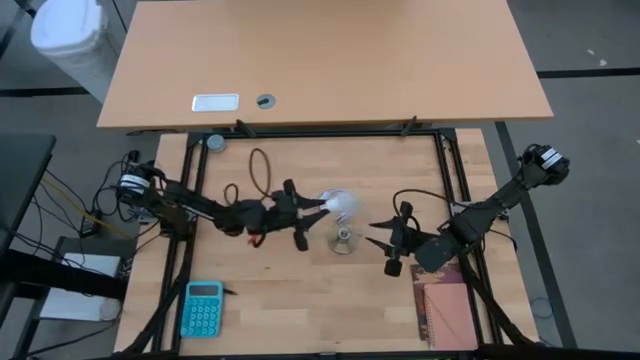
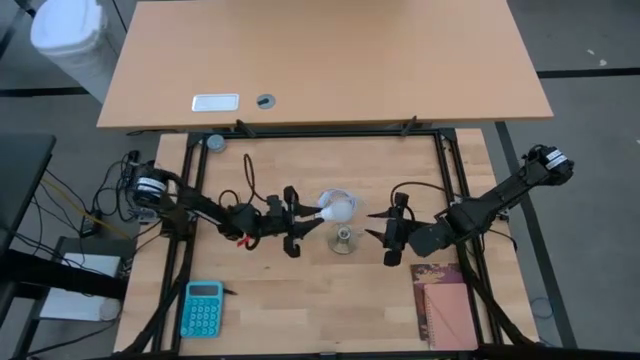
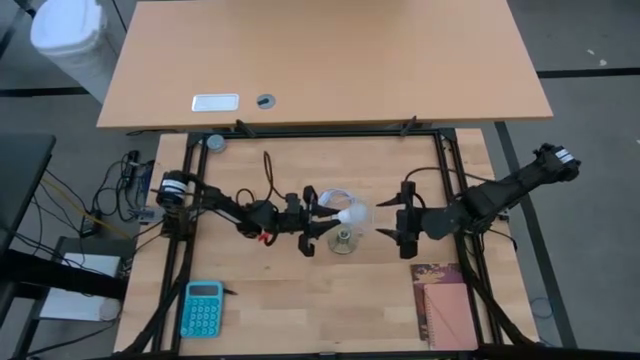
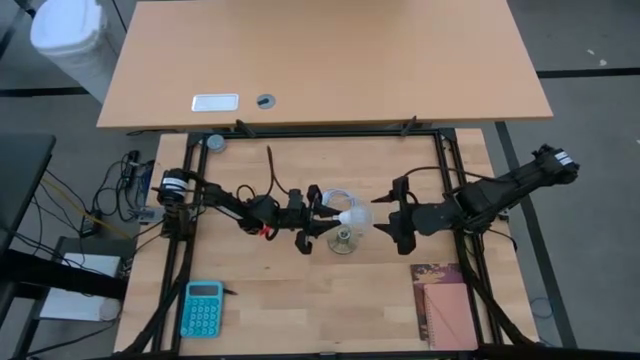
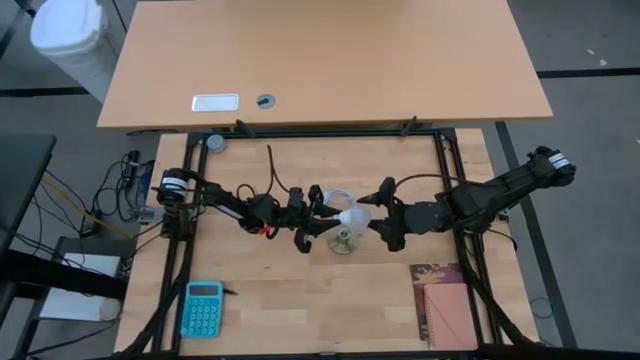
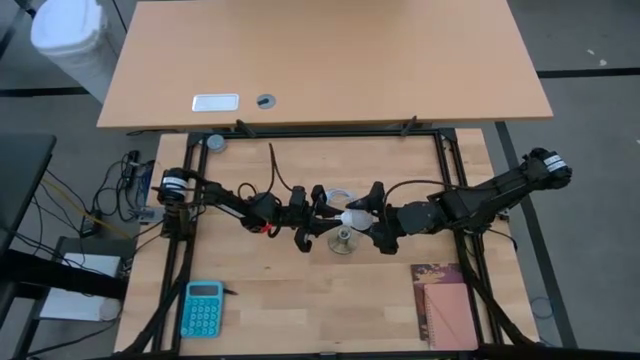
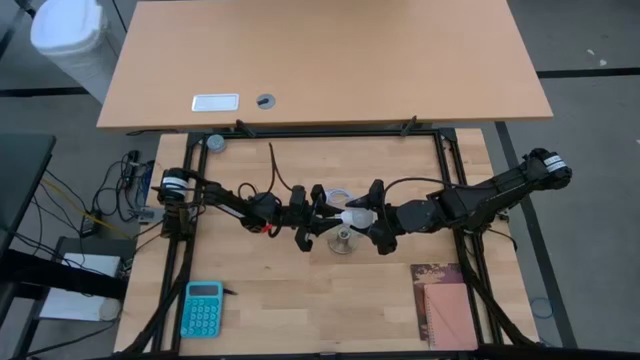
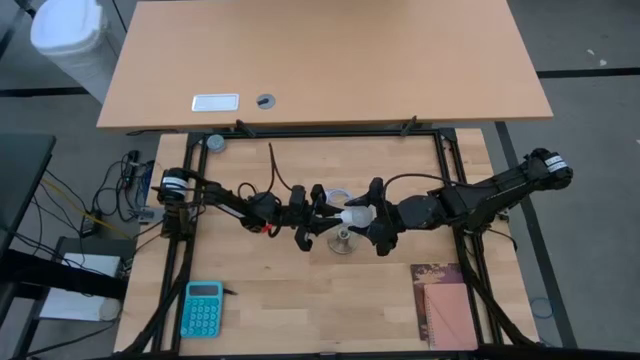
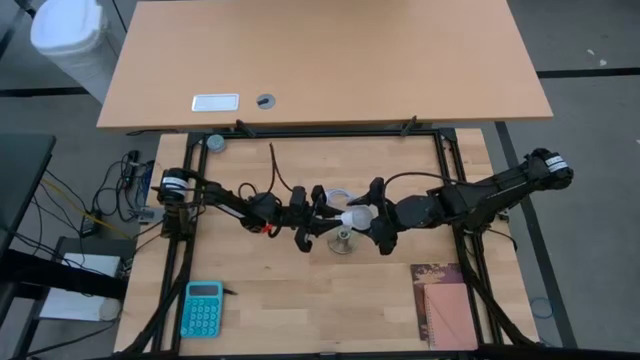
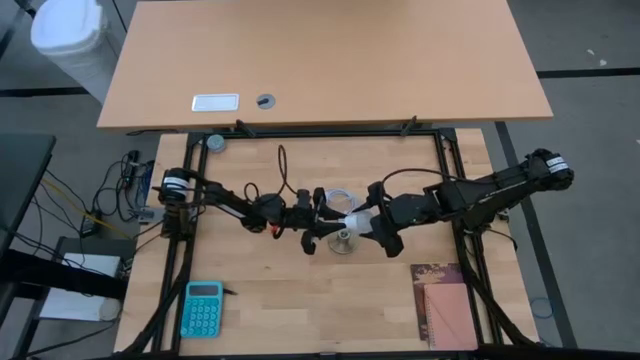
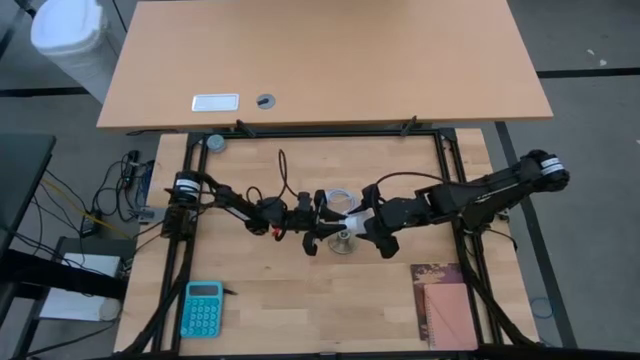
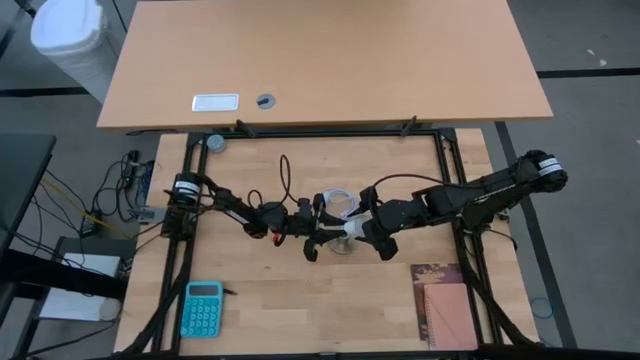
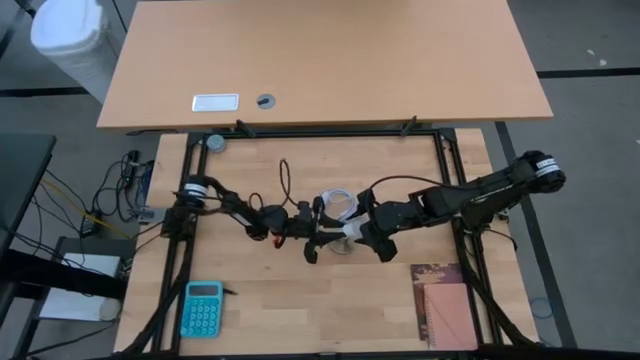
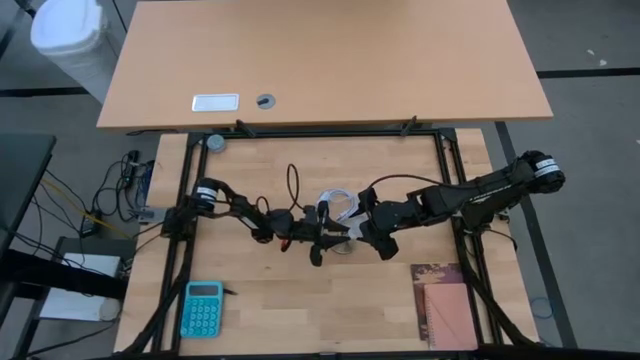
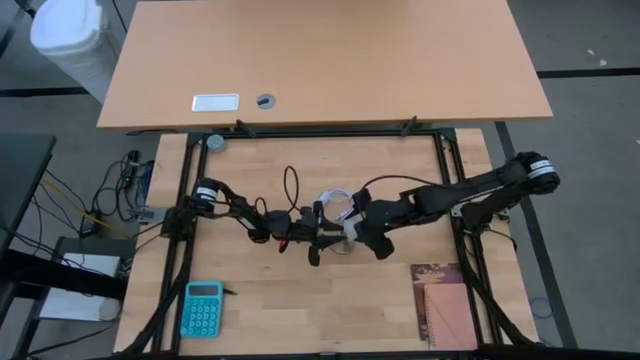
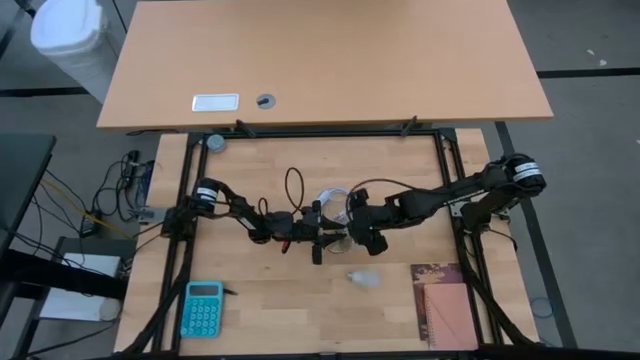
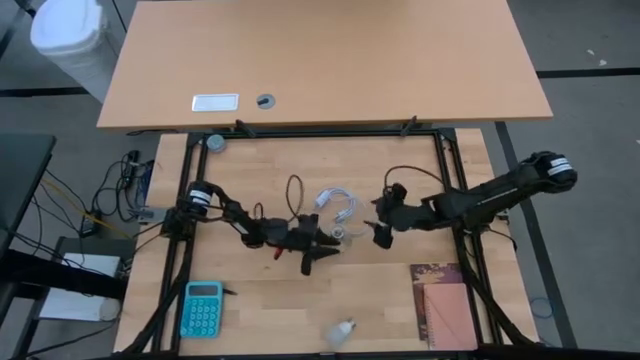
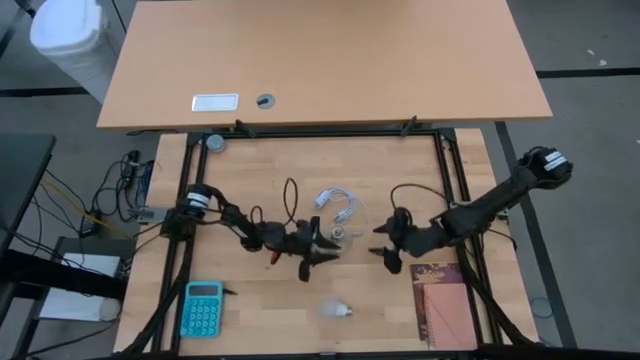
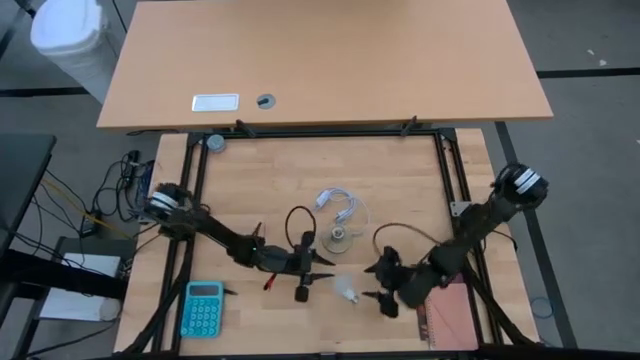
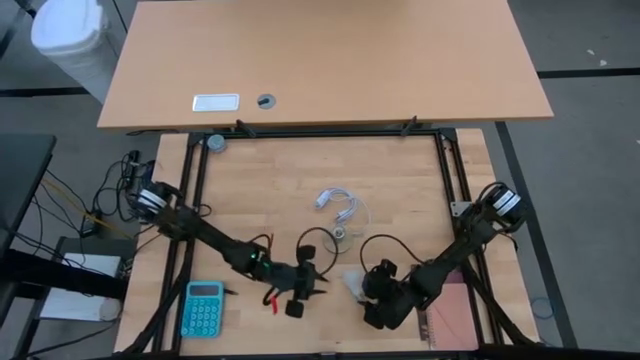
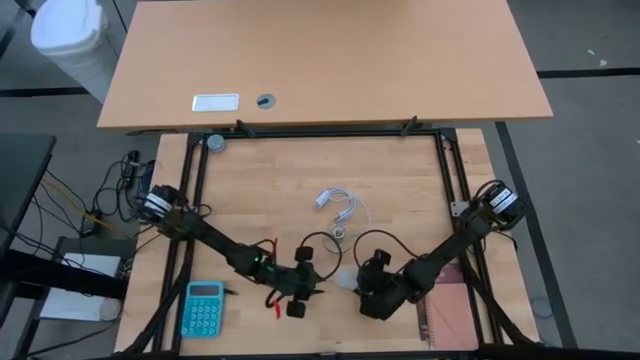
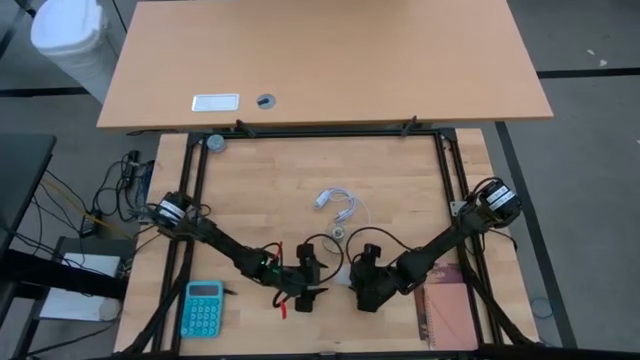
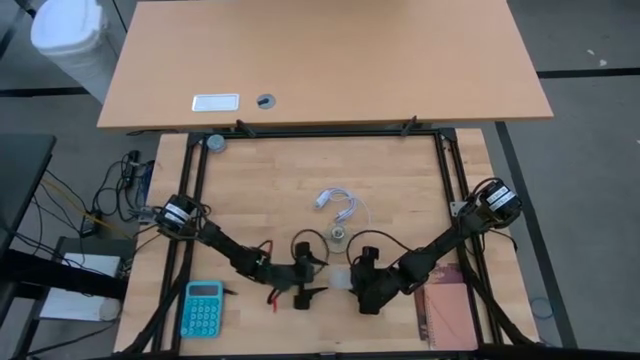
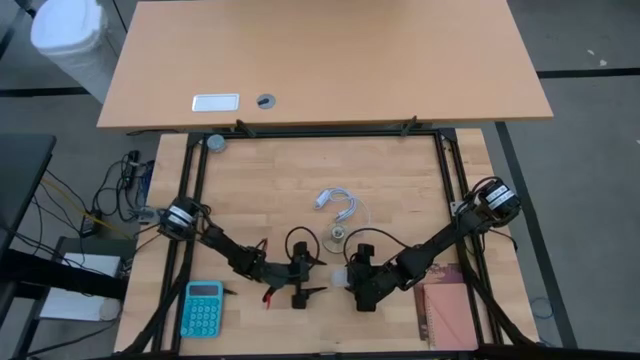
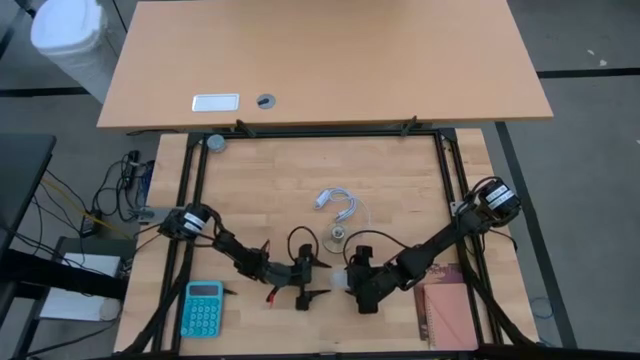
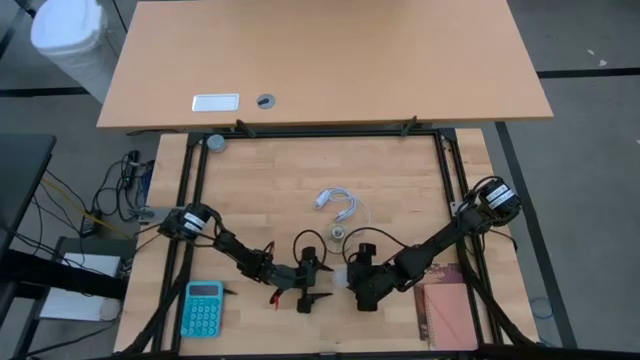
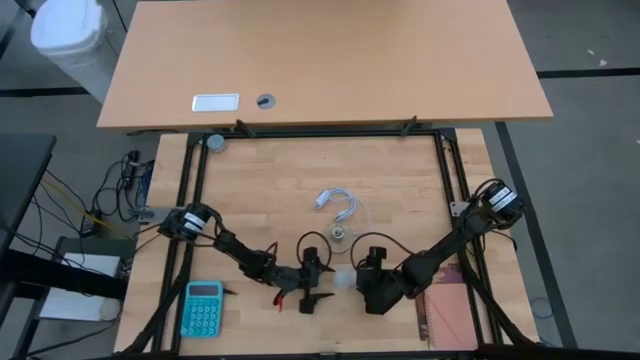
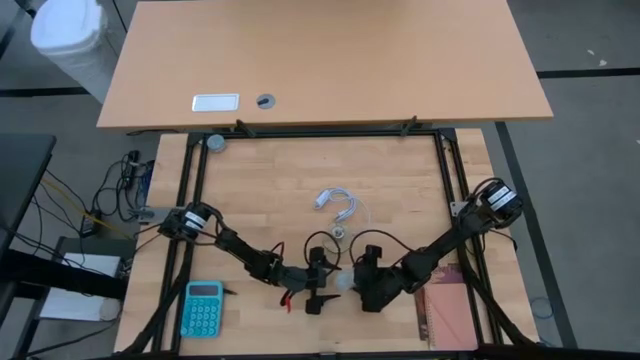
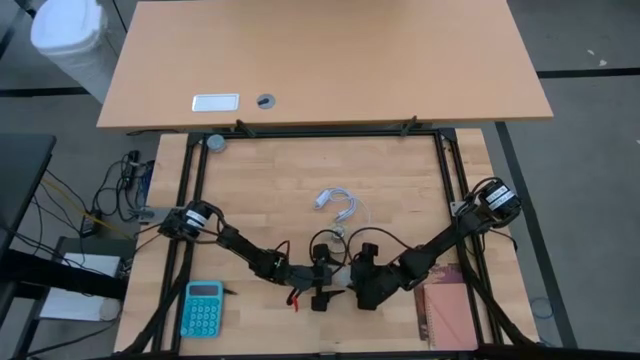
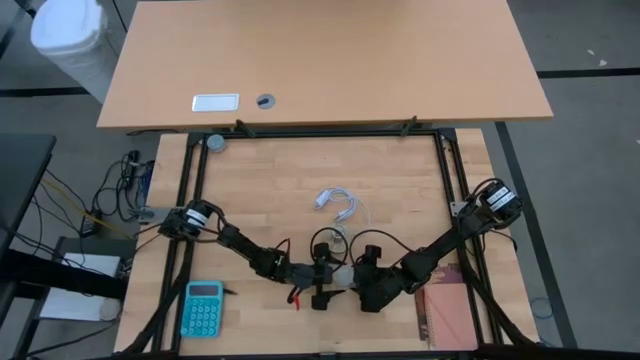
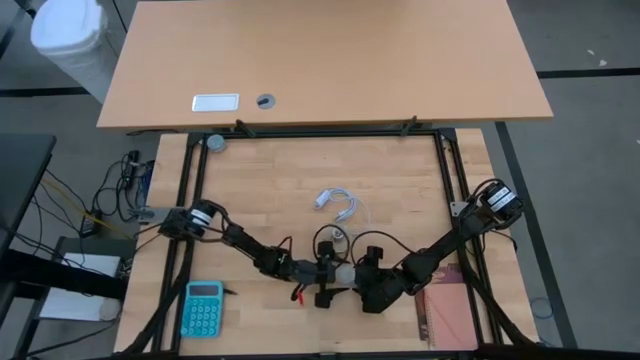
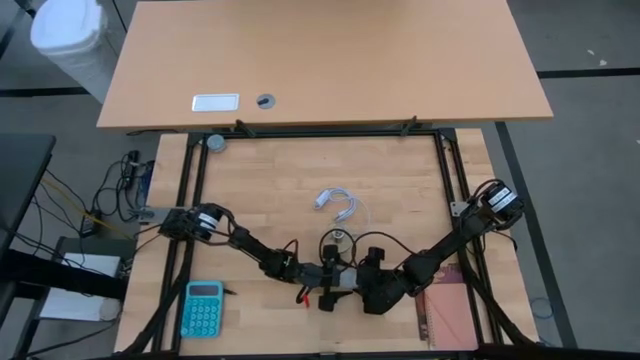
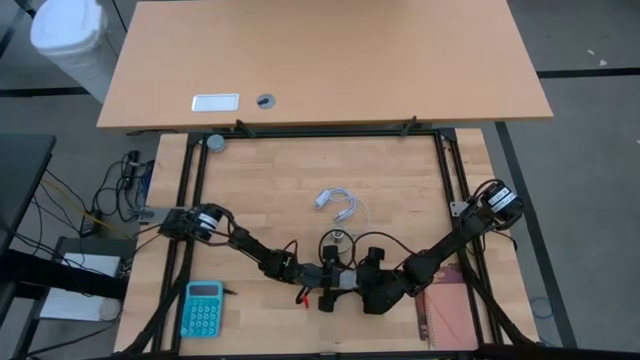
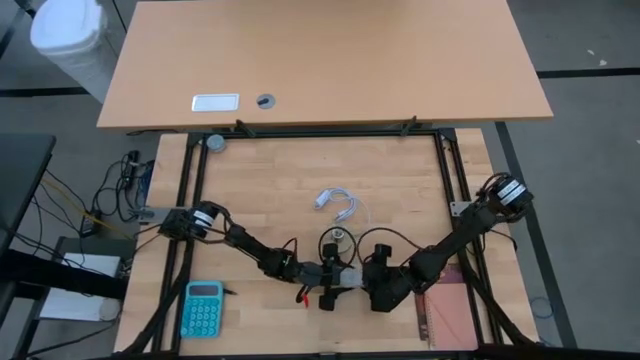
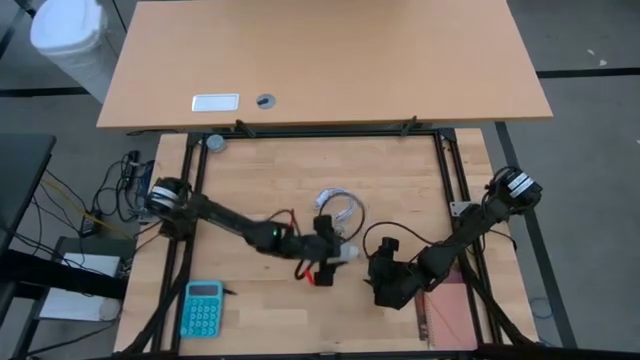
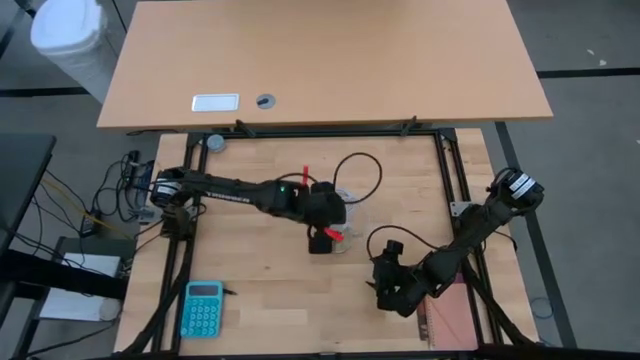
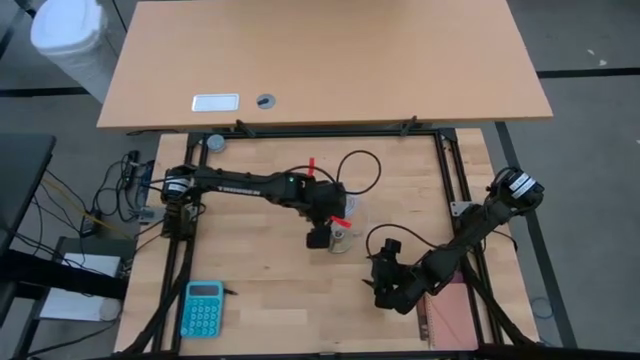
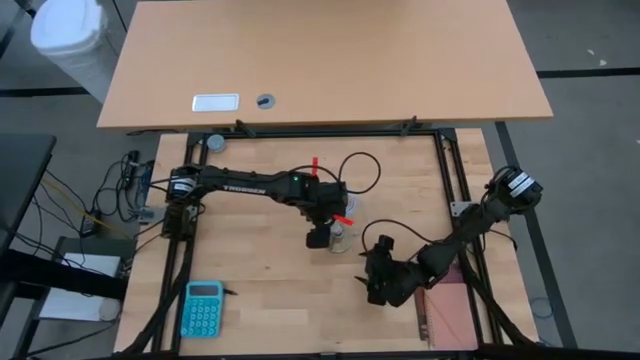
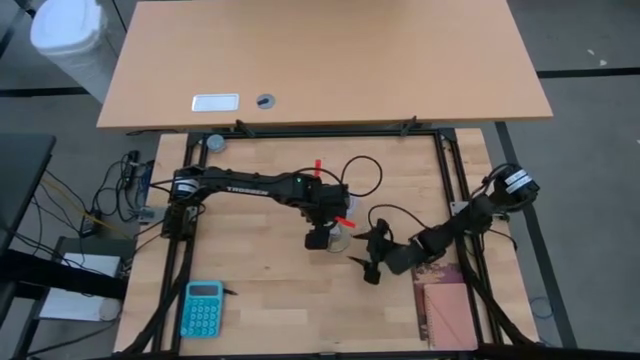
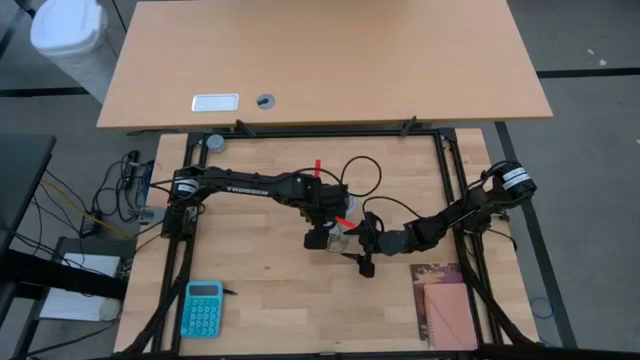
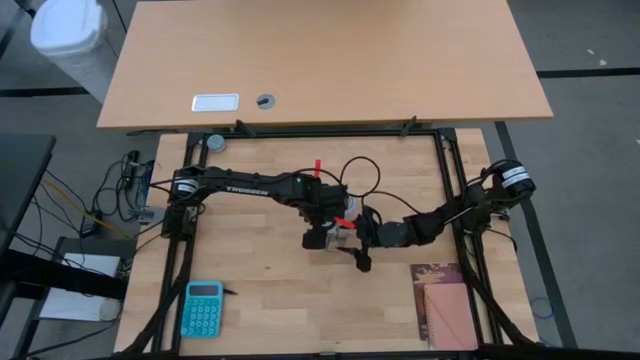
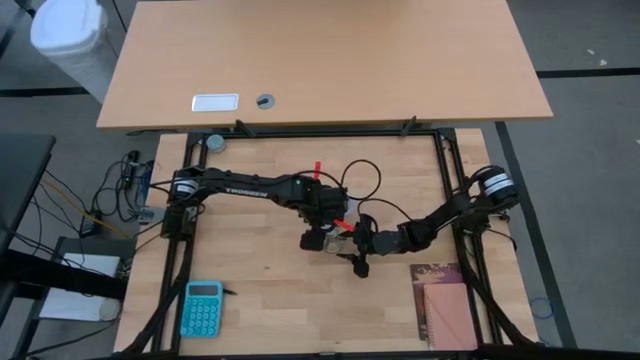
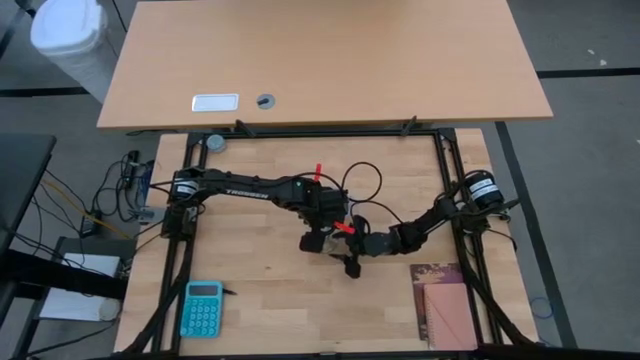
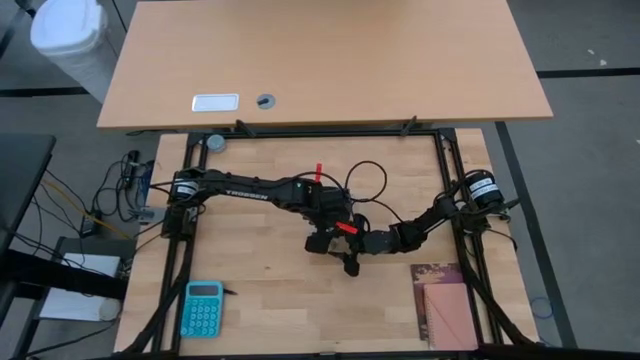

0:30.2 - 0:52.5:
Task: Screw lightbulb
Insert the white lightbulb into the lamp socket
